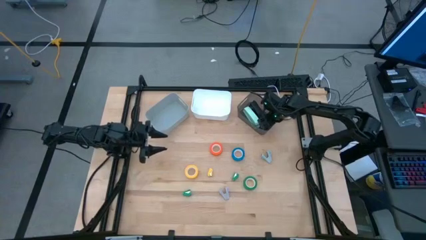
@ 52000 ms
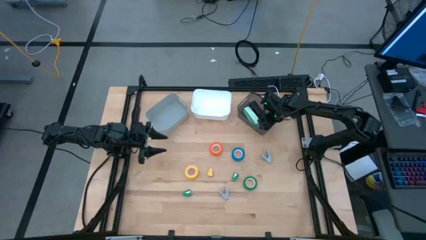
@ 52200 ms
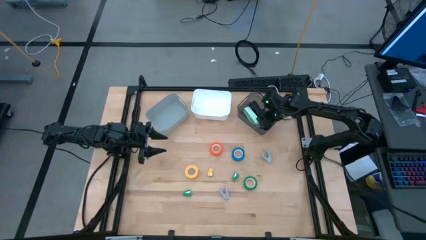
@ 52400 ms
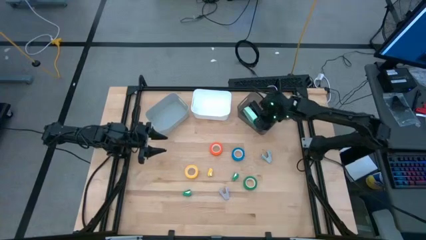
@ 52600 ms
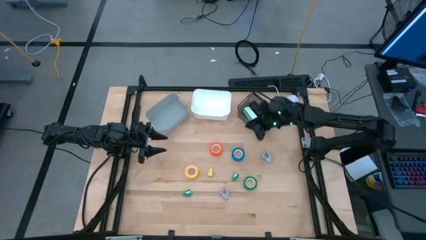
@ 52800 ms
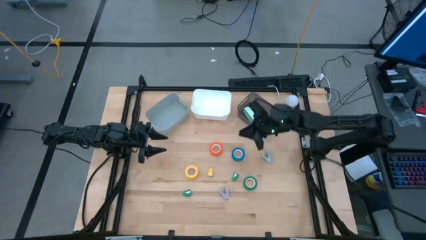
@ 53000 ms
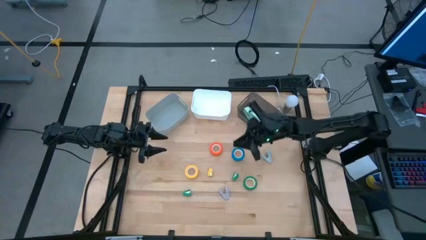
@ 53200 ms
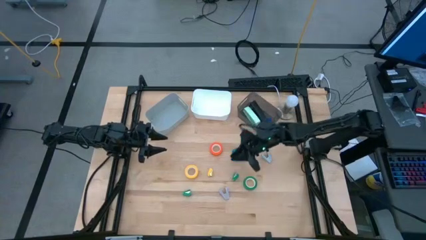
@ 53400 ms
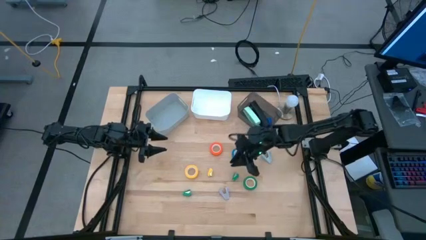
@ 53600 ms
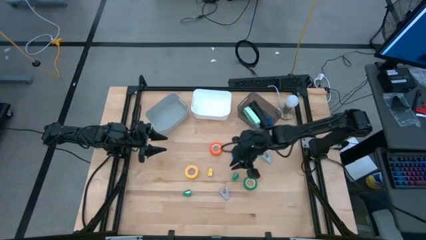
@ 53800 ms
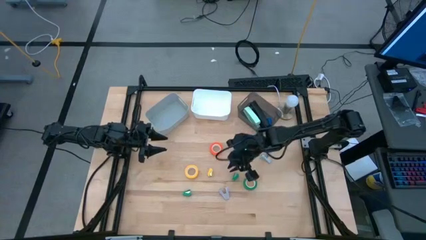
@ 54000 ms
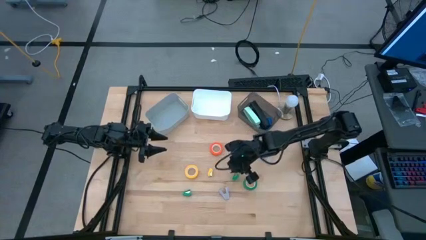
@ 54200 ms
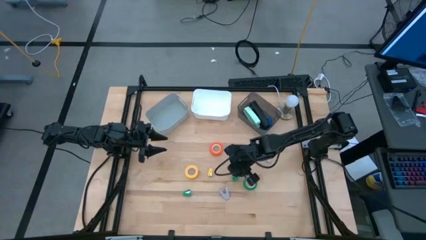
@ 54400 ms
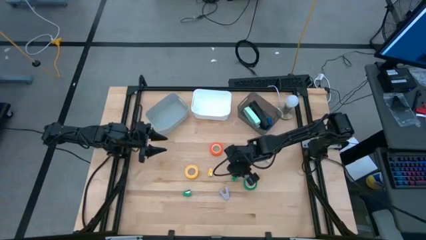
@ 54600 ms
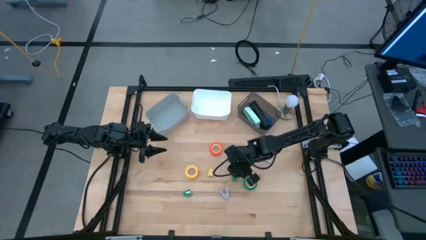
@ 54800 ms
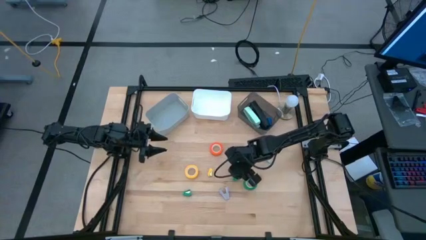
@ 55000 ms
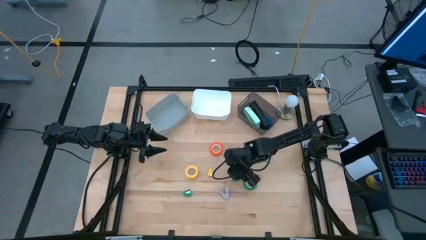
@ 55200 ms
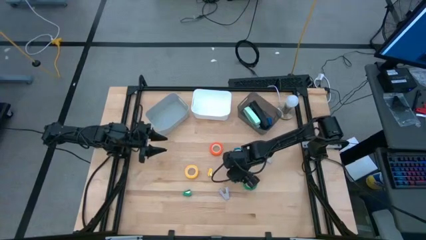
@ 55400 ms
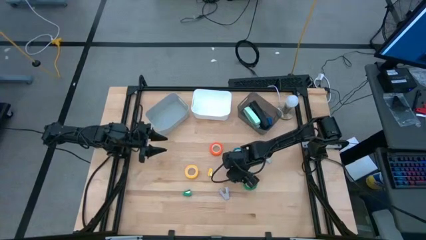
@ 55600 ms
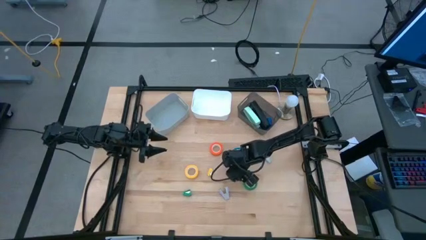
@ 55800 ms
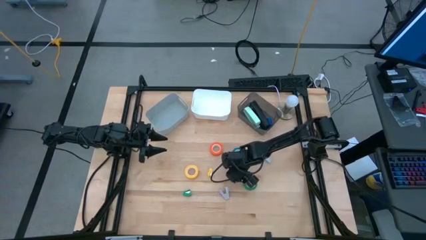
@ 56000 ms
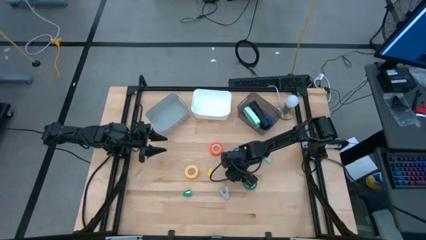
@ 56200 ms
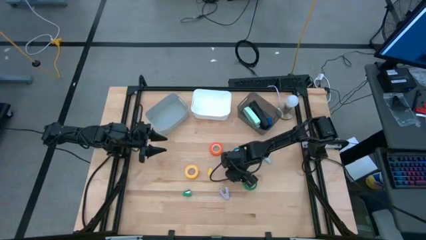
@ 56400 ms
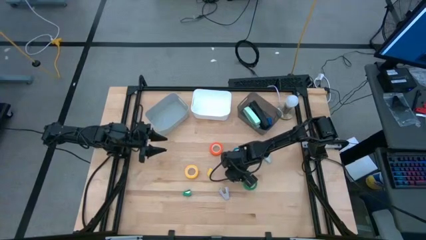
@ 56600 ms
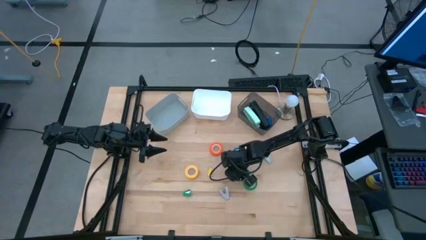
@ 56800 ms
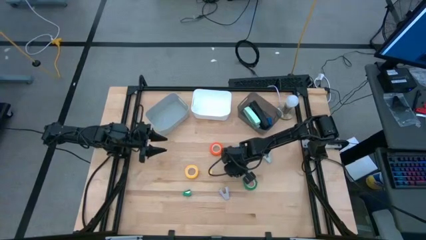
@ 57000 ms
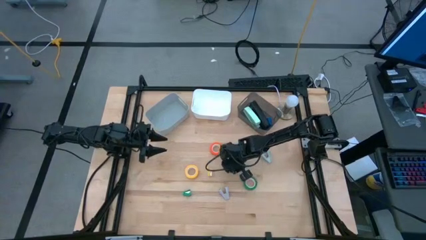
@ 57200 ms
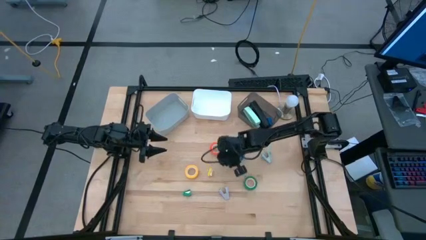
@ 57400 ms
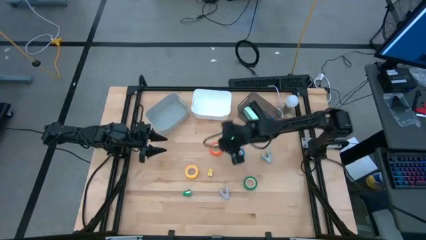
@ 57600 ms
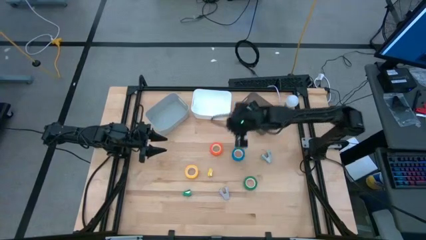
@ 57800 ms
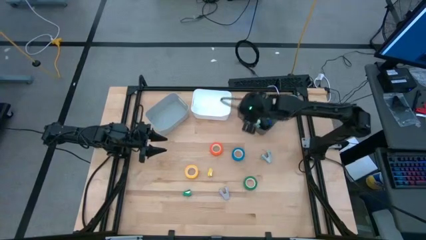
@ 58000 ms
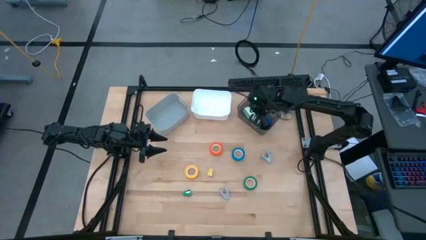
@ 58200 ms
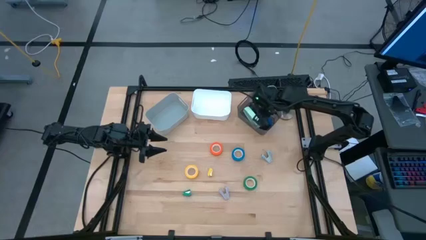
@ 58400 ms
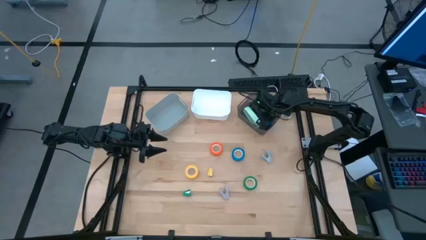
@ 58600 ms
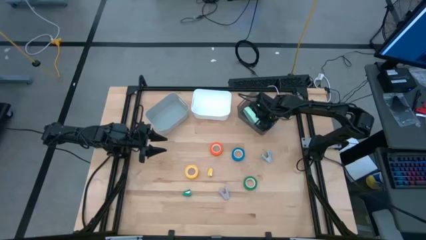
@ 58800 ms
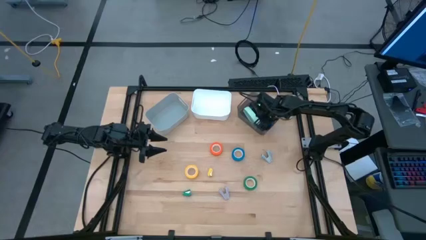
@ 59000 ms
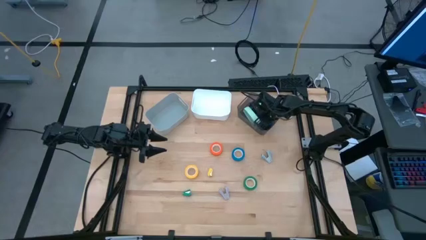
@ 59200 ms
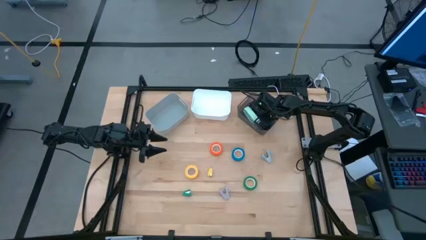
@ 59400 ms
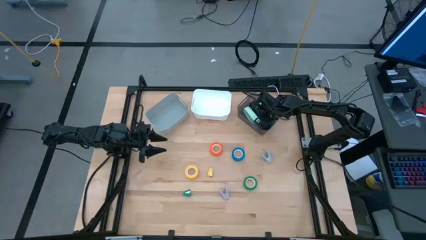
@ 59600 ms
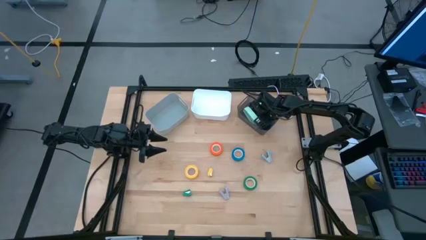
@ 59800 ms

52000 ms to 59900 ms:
Task: Pick and place Stapler, Stapler remover, tape
Put the top small green stapler into the black bin

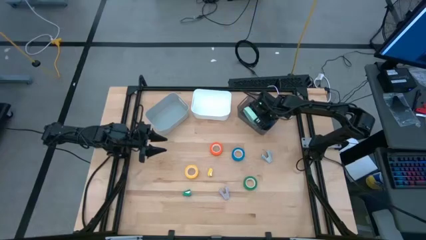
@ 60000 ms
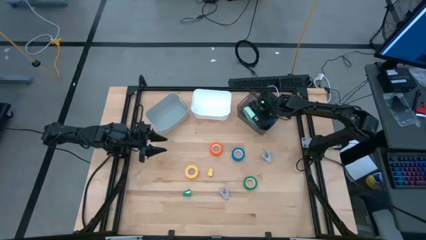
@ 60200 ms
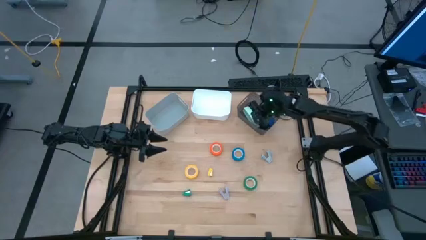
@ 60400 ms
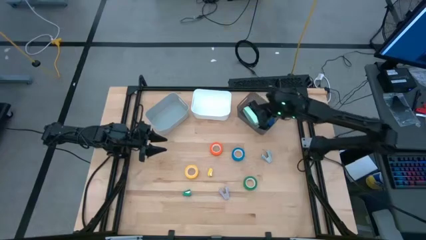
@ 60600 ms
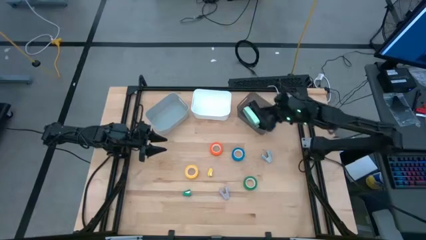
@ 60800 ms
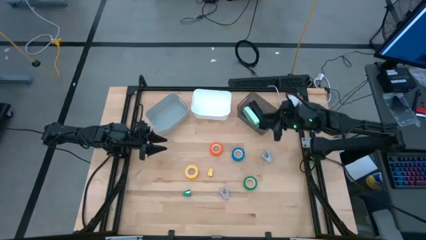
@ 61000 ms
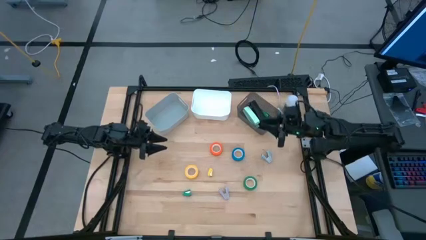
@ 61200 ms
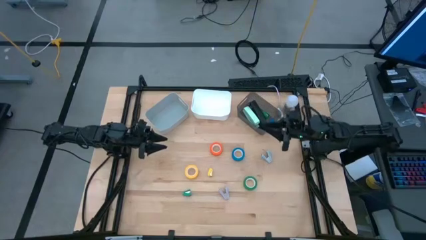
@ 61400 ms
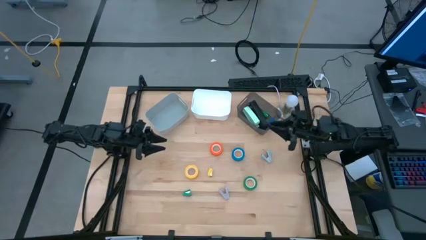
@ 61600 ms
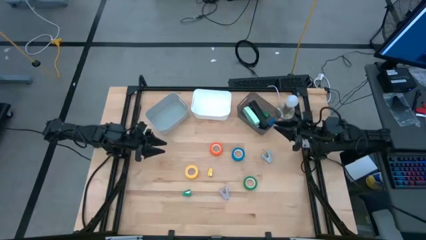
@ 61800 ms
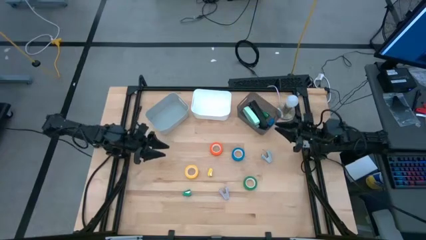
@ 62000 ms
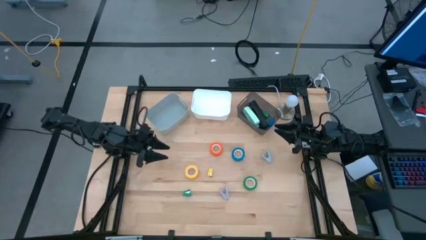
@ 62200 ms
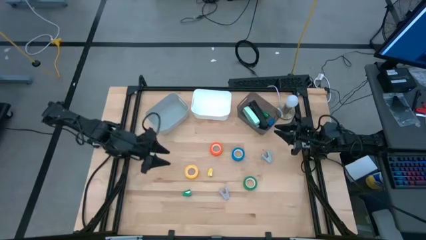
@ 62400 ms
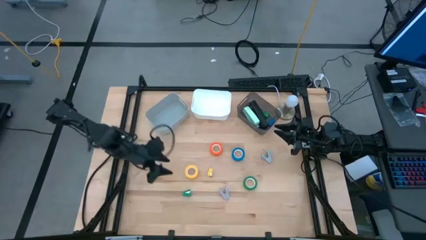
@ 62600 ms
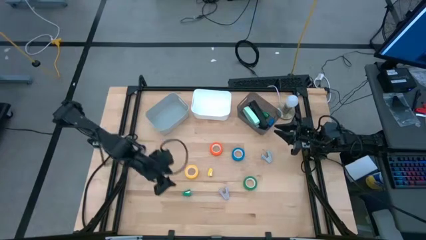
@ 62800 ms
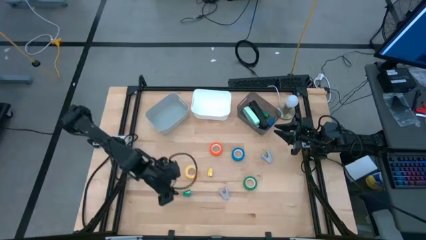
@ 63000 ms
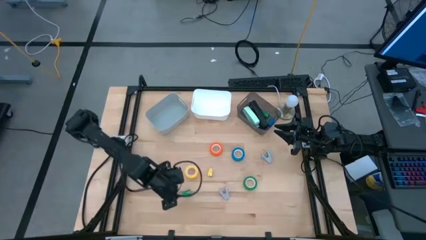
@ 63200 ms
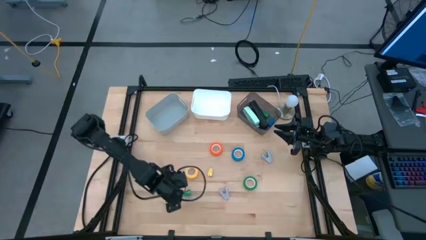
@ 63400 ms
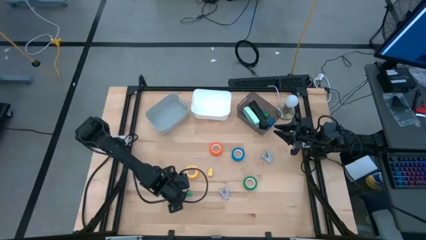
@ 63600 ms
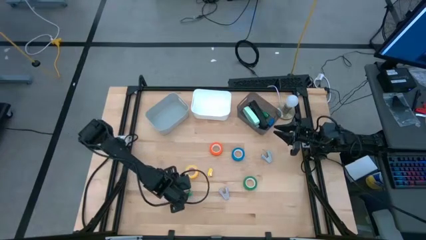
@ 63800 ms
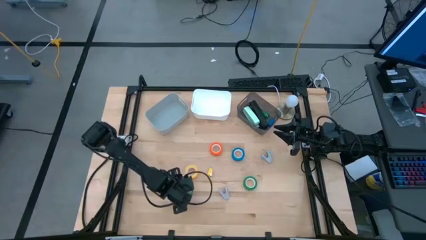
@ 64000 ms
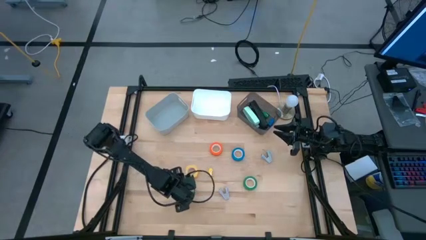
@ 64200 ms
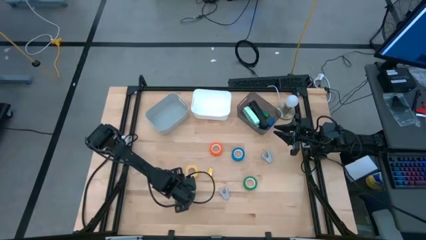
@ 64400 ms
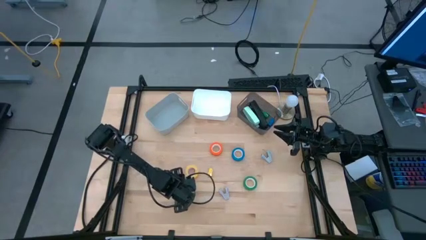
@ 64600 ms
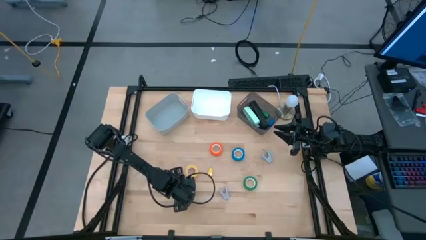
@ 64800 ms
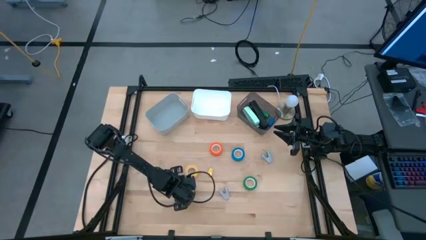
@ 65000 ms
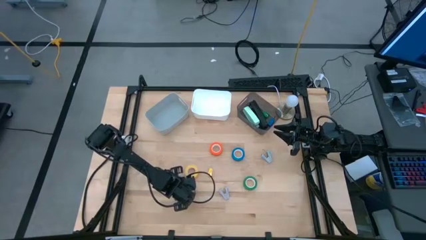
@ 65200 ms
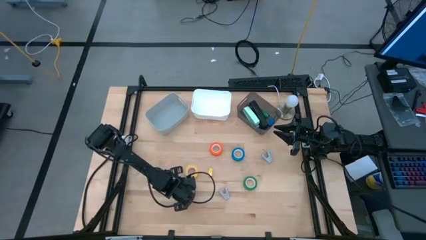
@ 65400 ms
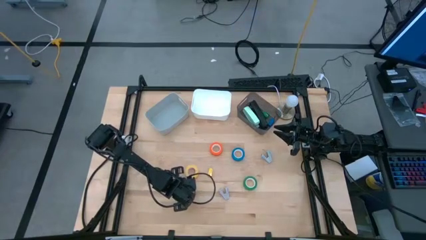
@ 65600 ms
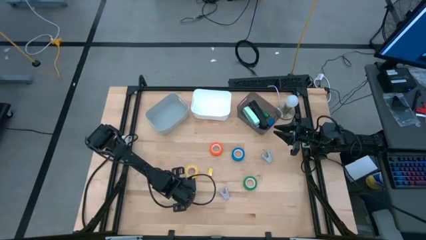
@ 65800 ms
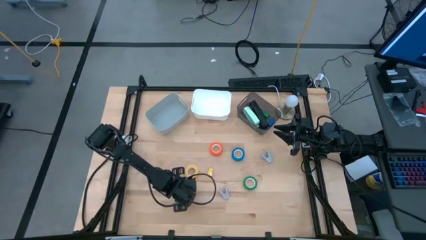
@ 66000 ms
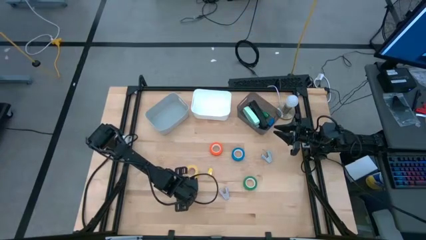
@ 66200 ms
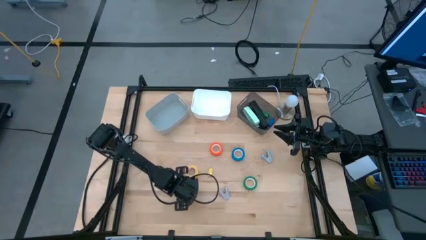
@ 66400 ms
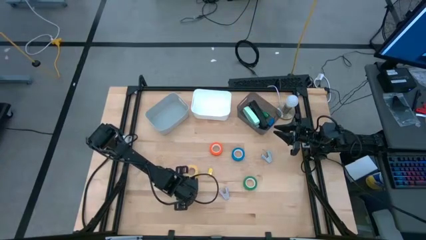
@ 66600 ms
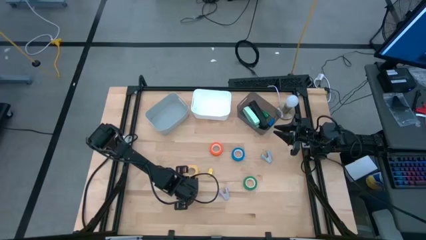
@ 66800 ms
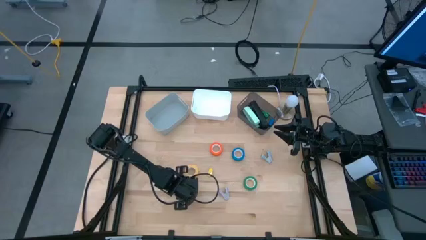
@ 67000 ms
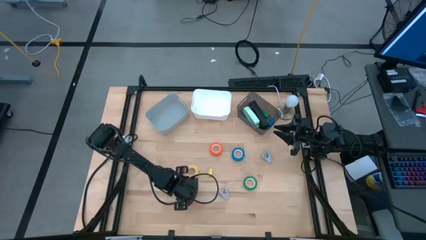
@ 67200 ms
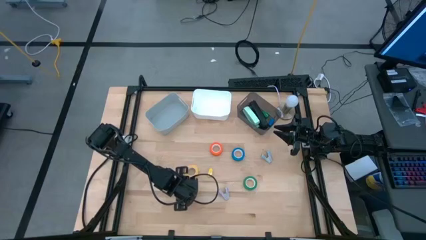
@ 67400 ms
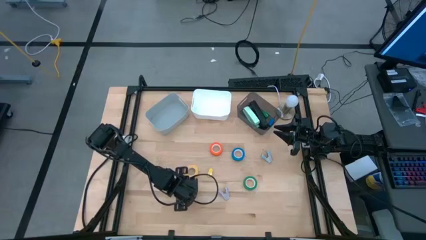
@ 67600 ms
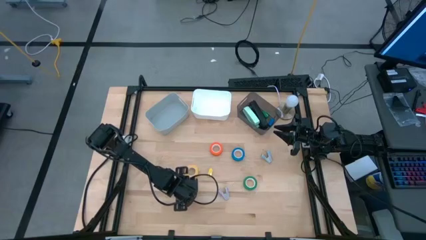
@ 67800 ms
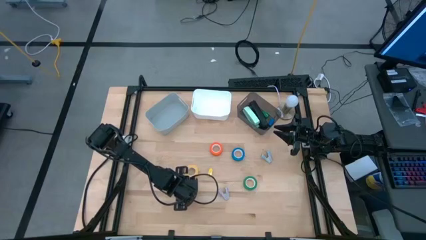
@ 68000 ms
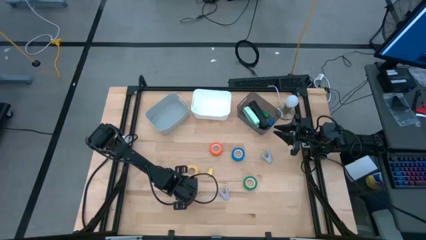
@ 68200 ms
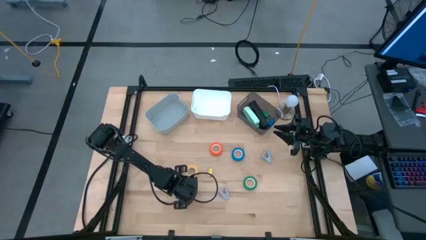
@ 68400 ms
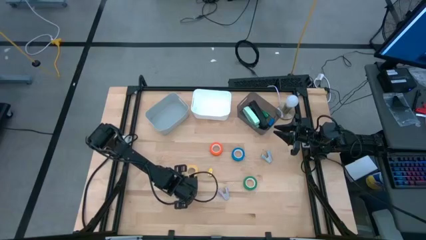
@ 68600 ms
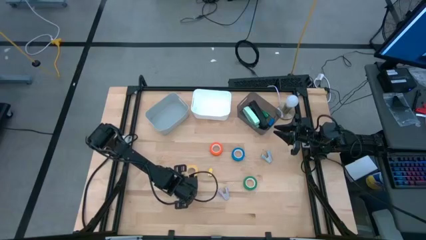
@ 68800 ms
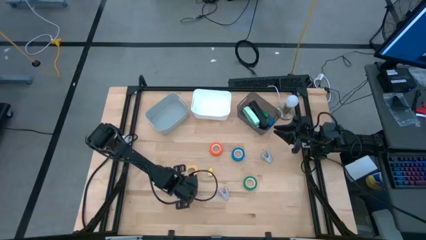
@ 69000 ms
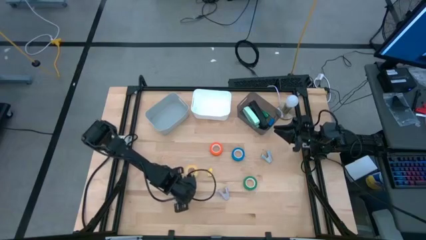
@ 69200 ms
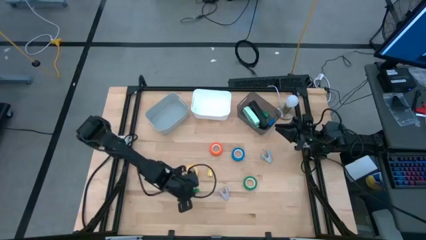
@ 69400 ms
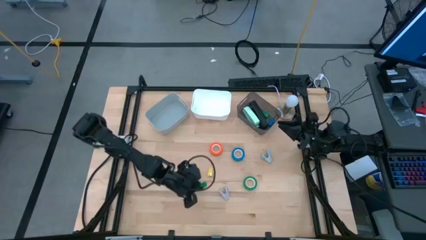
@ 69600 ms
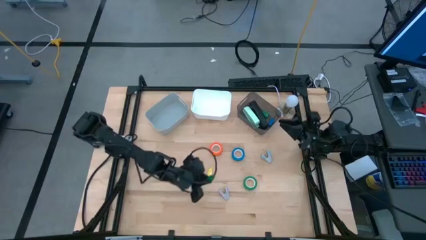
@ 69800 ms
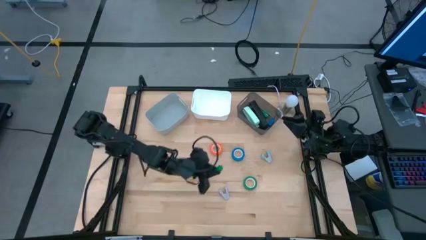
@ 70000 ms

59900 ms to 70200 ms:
Put the small green stapler into the black bin
